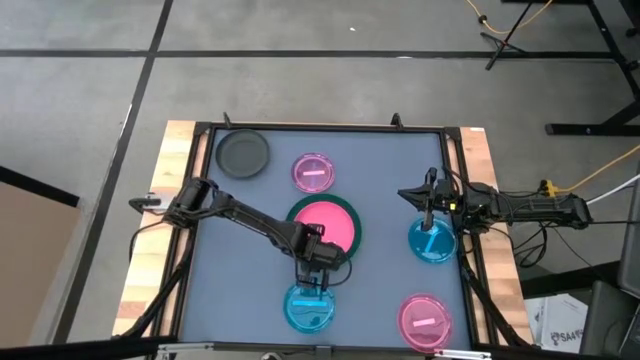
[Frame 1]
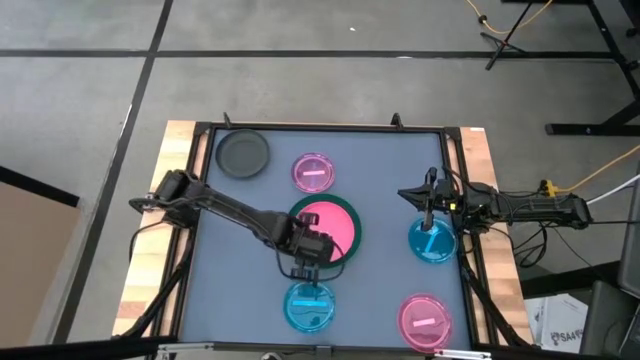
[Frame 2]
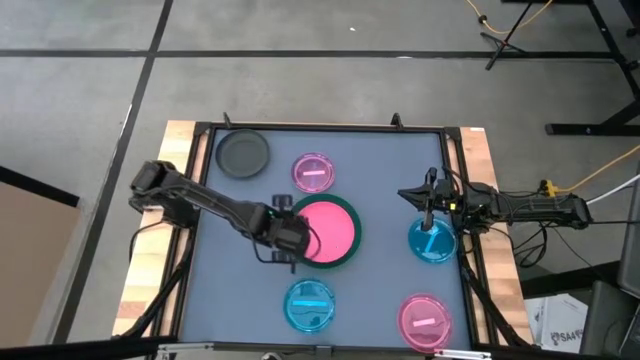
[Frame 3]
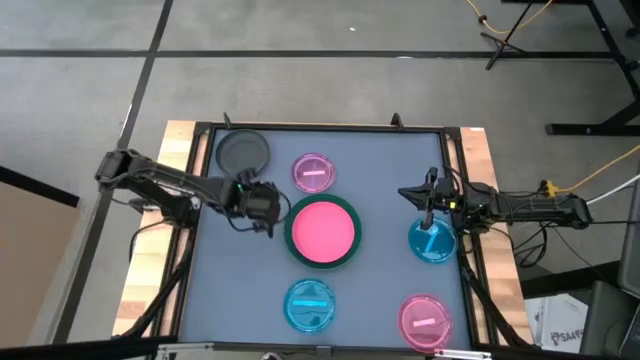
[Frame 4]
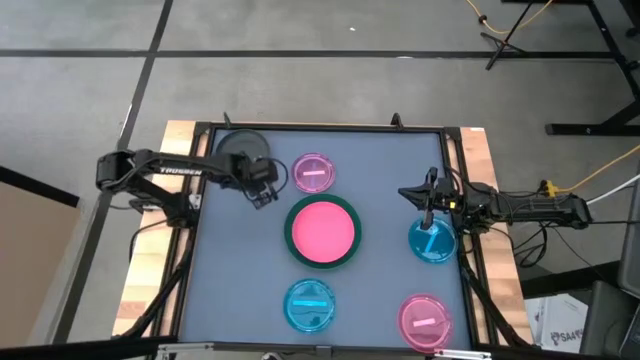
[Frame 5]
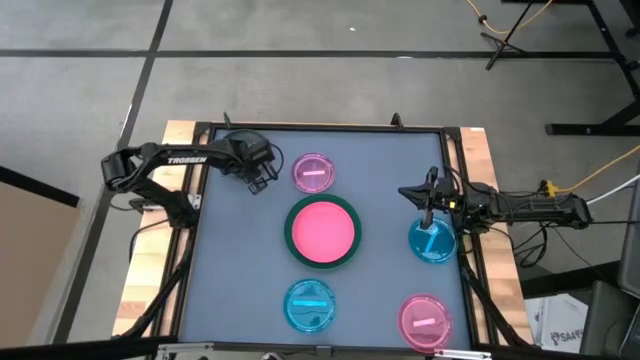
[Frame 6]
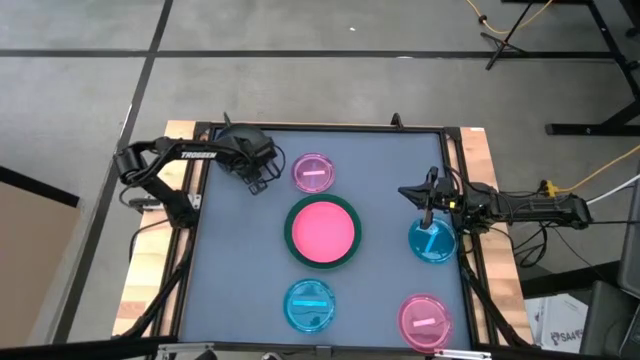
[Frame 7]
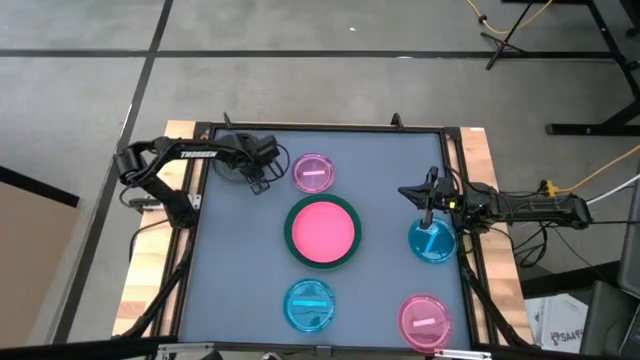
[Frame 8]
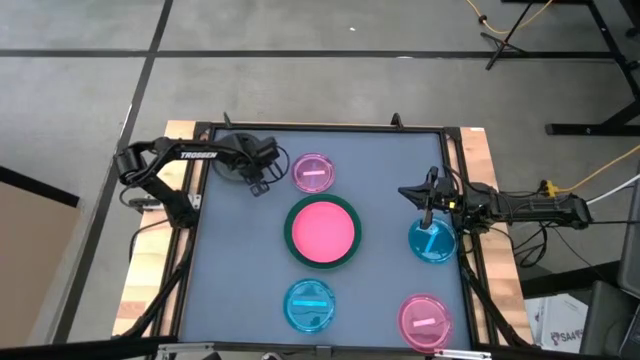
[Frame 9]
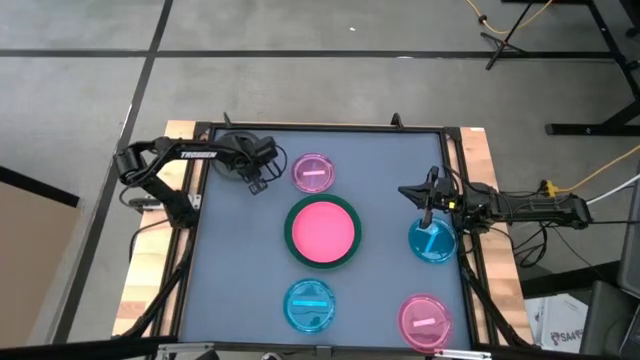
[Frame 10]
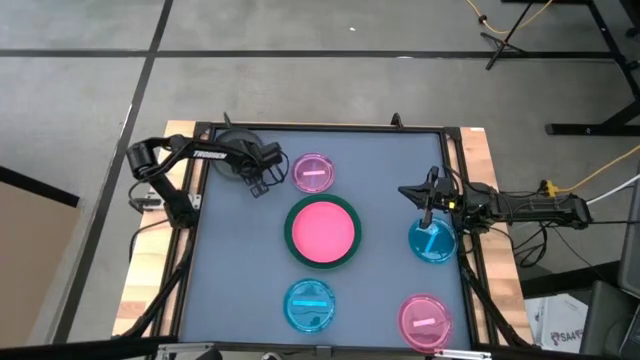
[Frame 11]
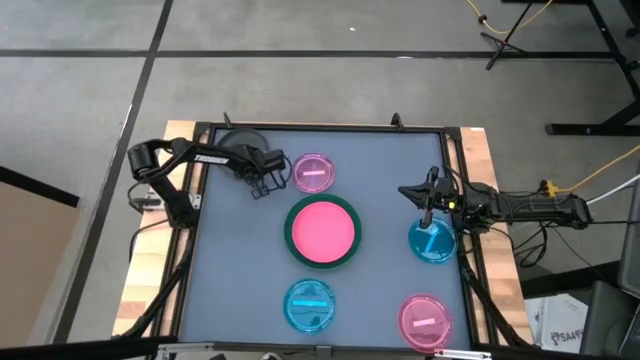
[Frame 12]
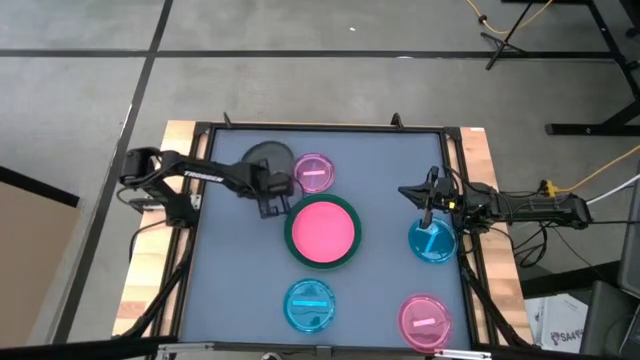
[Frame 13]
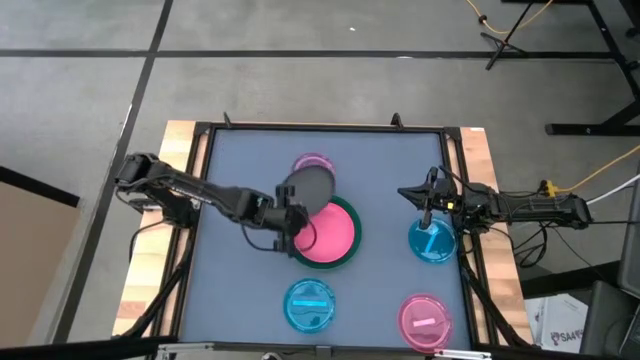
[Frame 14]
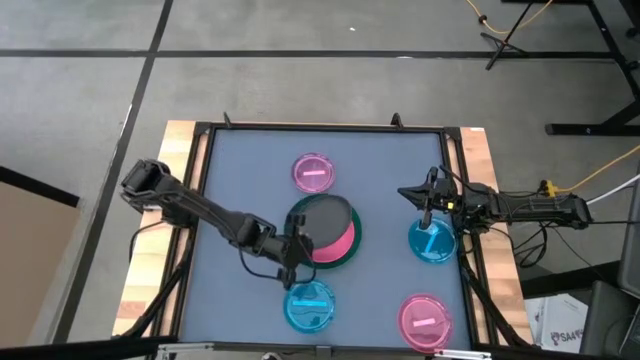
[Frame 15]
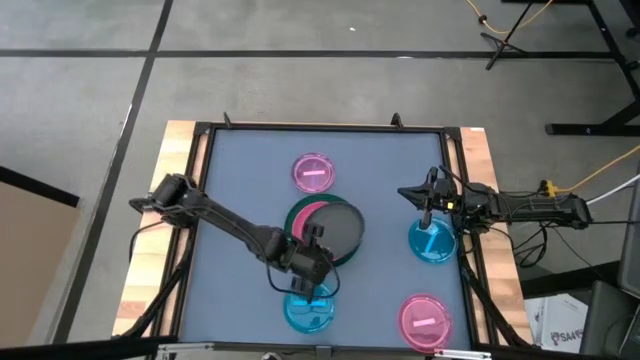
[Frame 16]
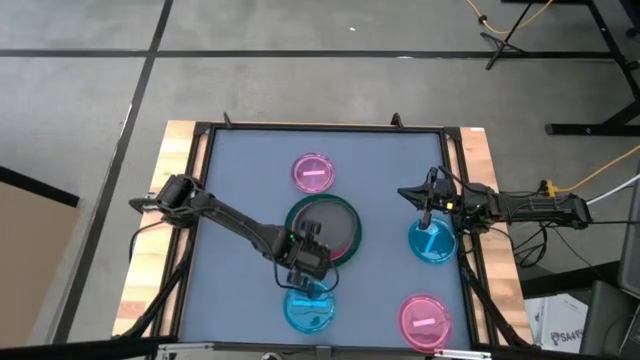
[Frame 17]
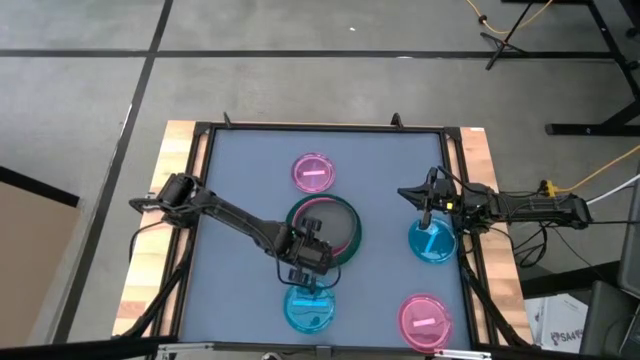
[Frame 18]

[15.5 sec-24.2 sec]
Task: Stack plastic plates
Stack the black plate on top of the pink plate

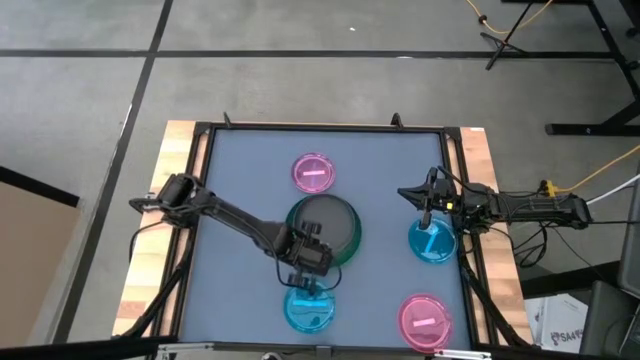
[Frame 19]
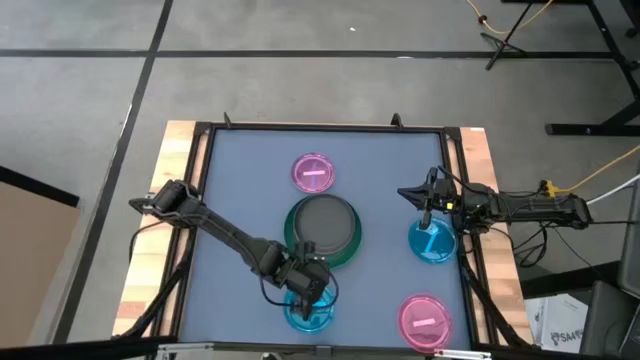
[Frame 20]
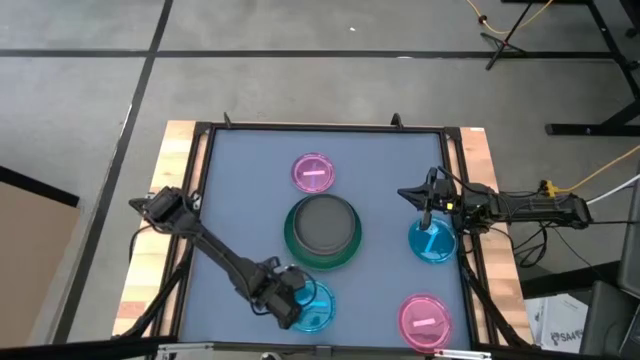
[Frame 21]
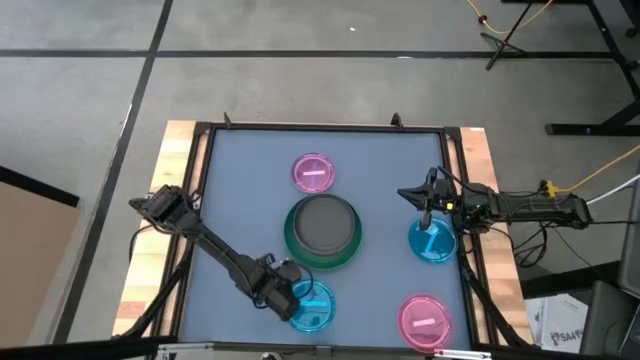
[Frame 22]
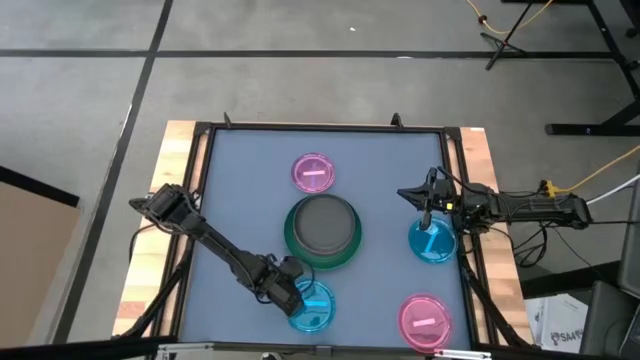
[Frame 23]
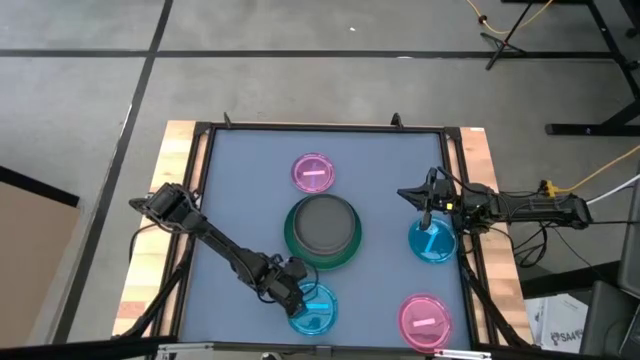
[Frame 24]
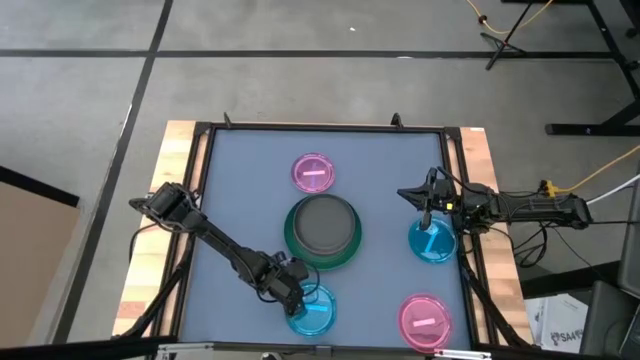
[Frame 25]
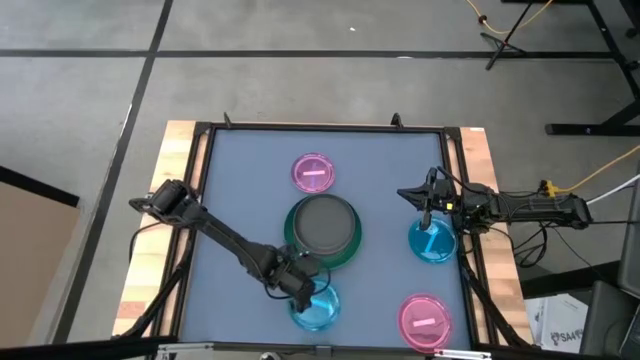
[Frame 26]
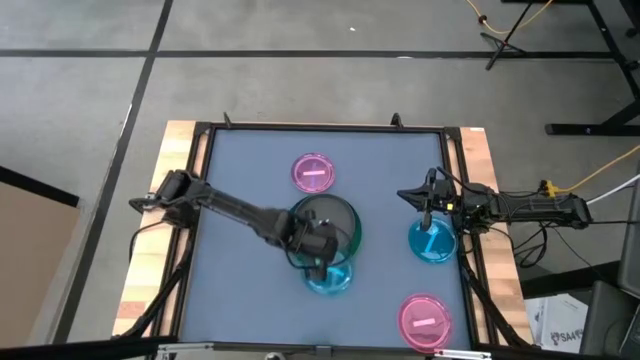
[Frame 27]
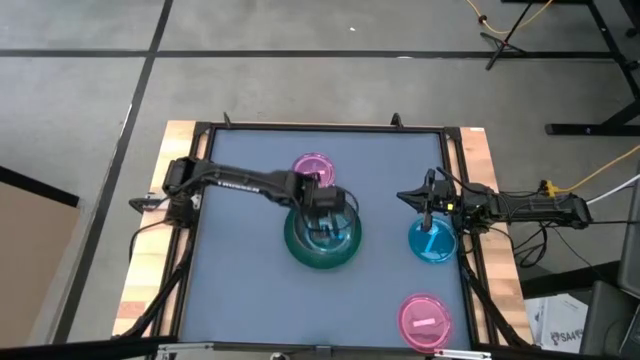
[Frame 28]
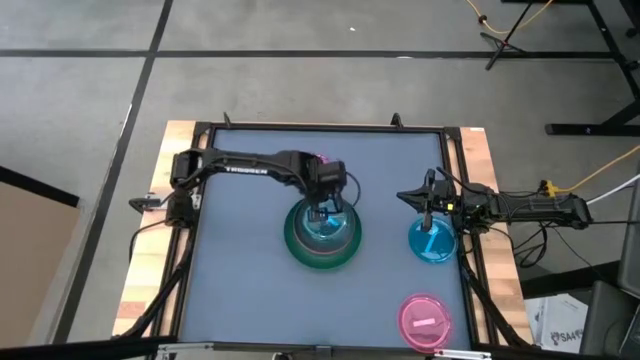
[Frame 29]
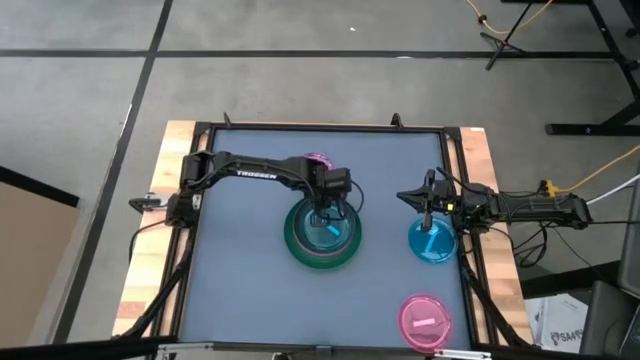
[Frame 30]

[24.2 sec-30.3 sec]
Stack the bottom blue plate top of the black plate

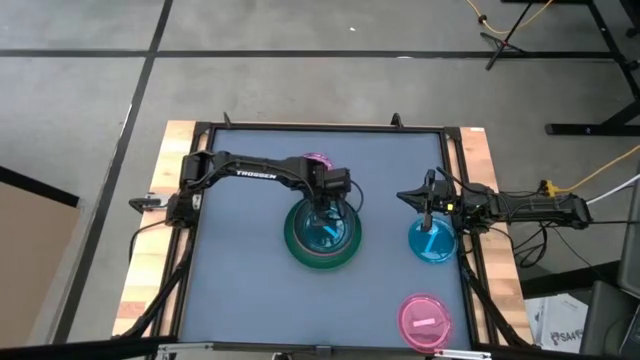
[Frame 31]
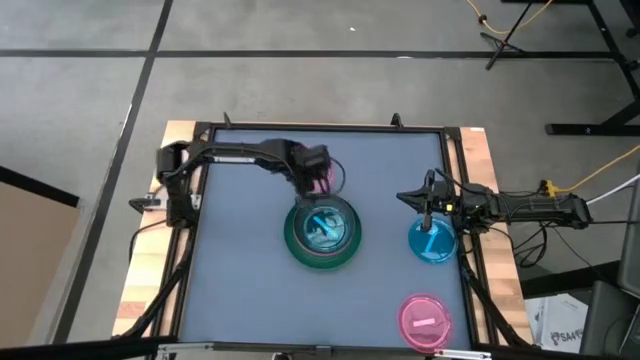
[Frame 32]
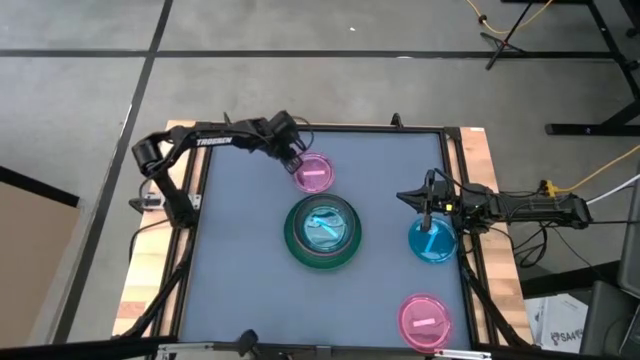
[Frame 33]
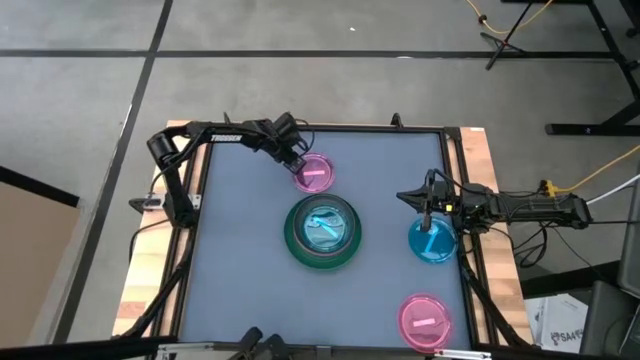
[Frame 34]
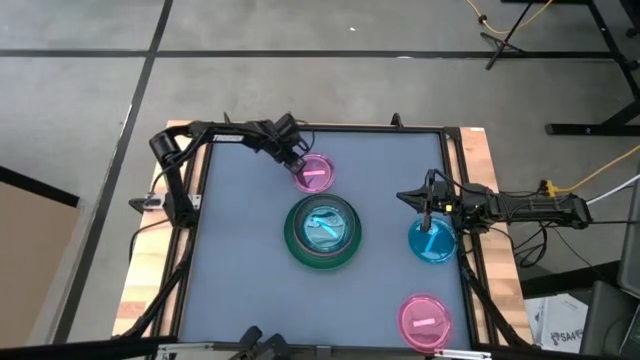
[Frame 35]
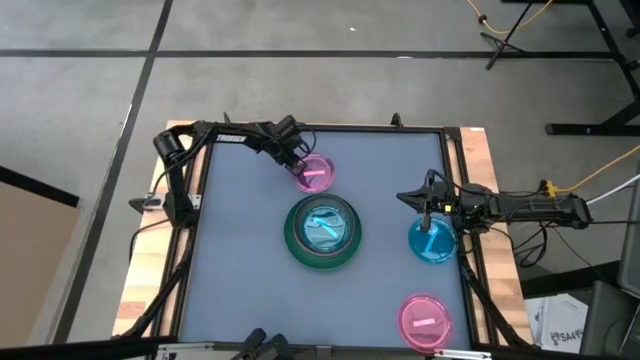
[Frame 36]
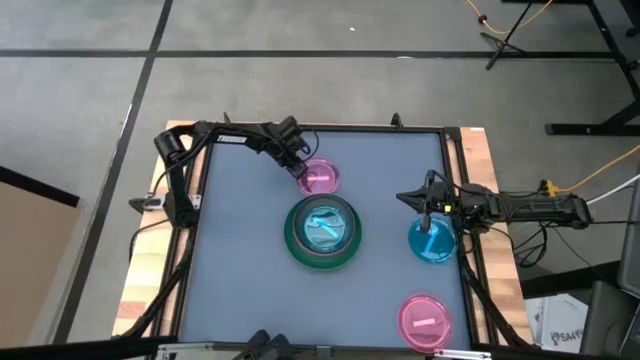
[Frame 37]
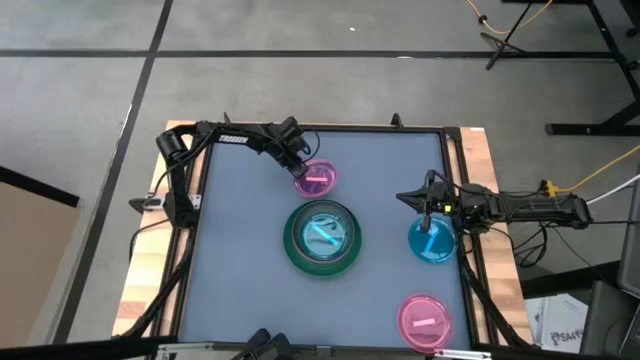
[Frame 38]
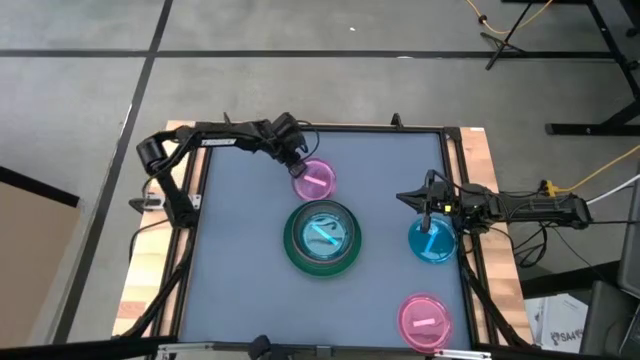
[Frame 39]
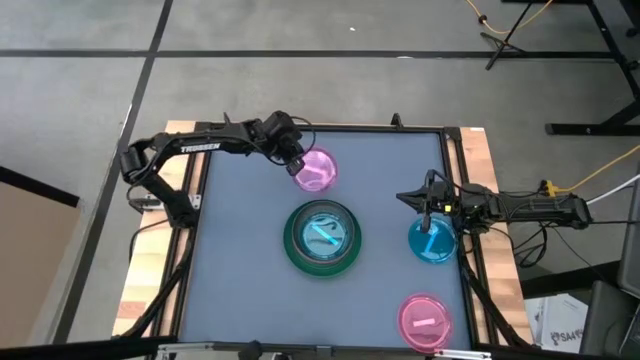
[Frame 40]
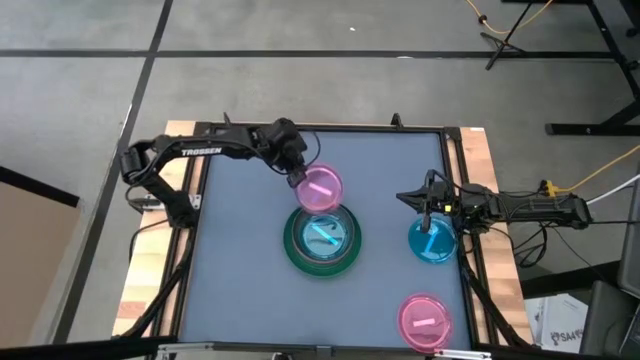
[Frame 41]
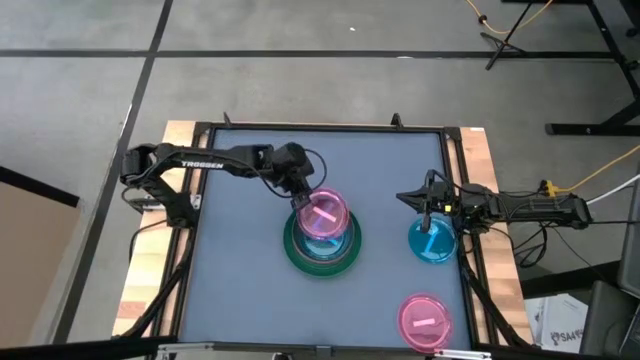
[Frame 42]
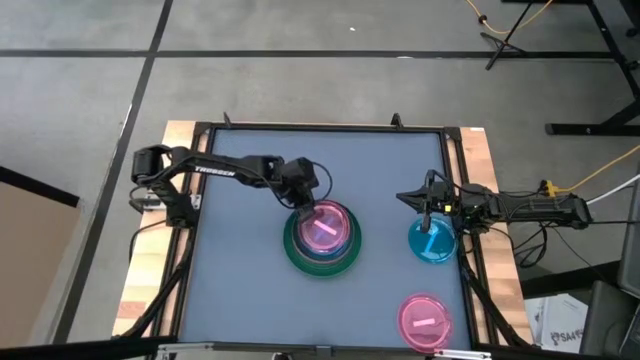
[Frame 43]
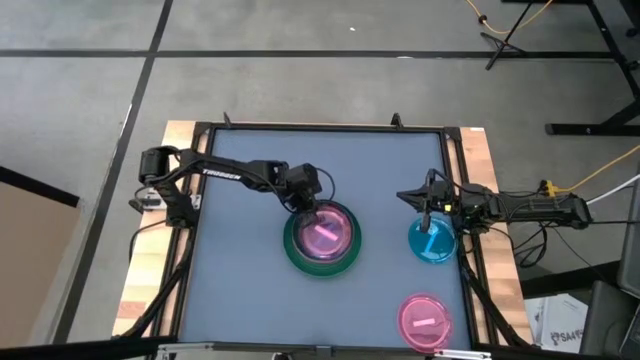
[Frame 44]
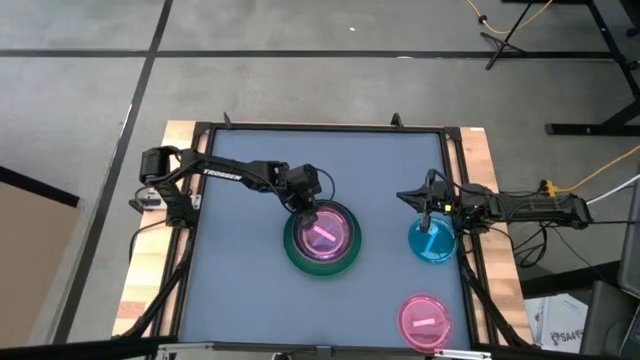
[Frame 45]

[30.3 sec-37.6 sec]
Stack the top light pink plate on top of the blue plate
